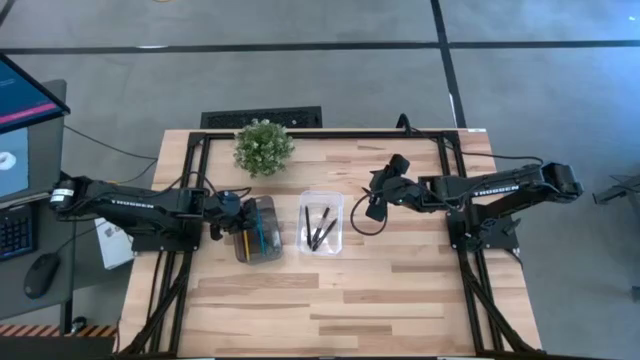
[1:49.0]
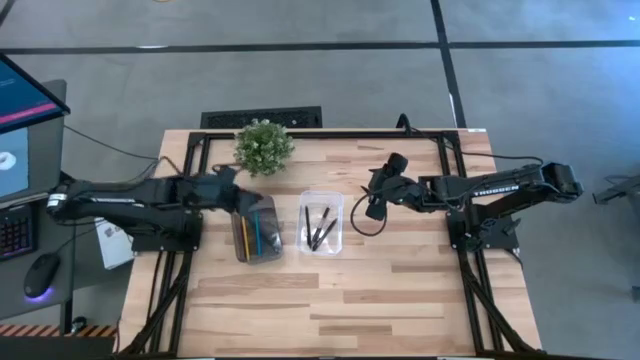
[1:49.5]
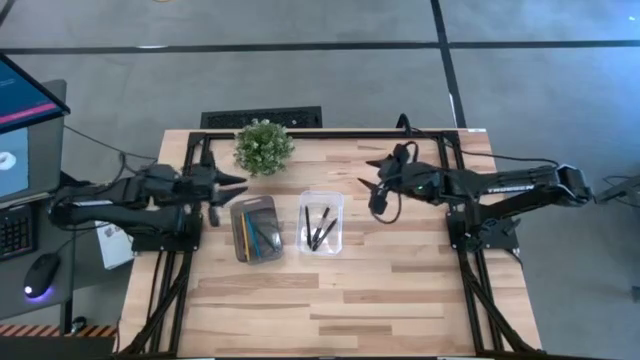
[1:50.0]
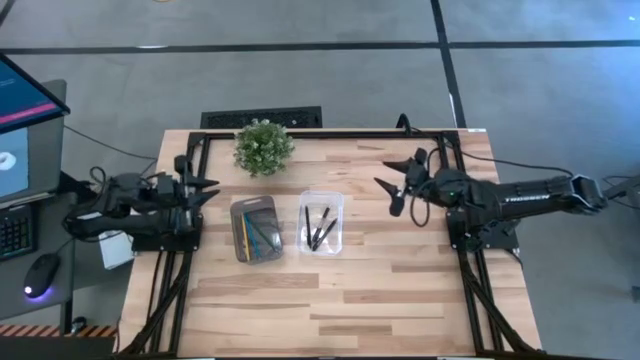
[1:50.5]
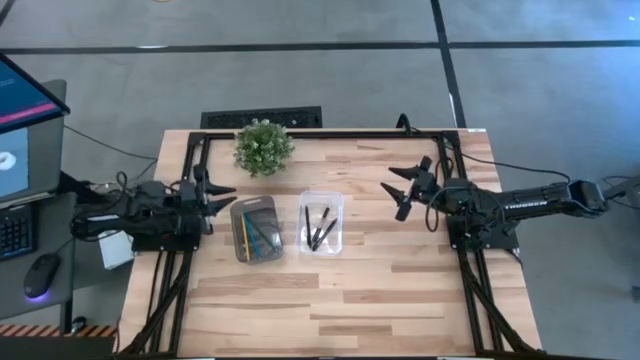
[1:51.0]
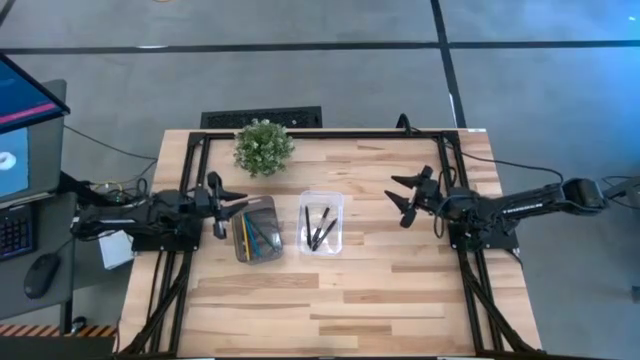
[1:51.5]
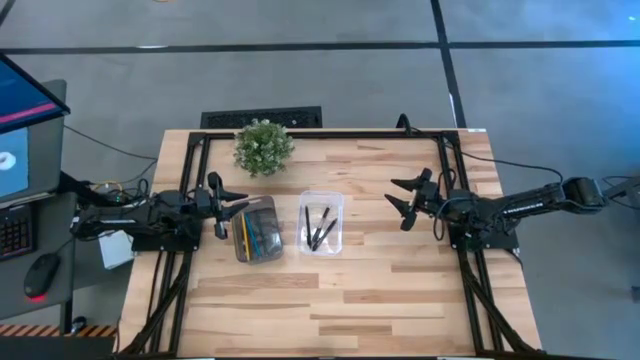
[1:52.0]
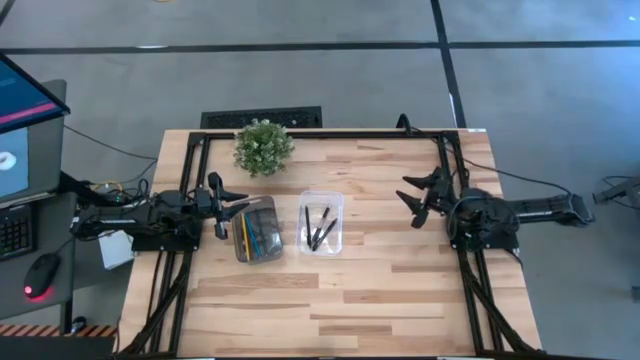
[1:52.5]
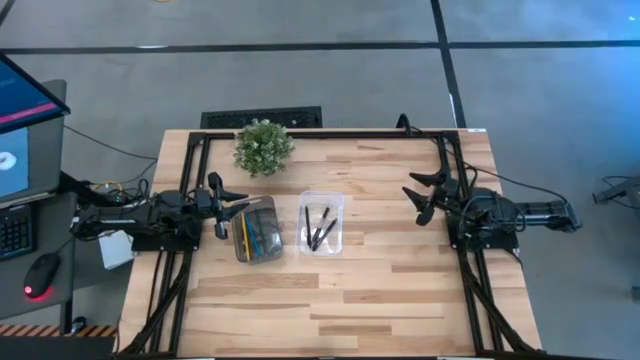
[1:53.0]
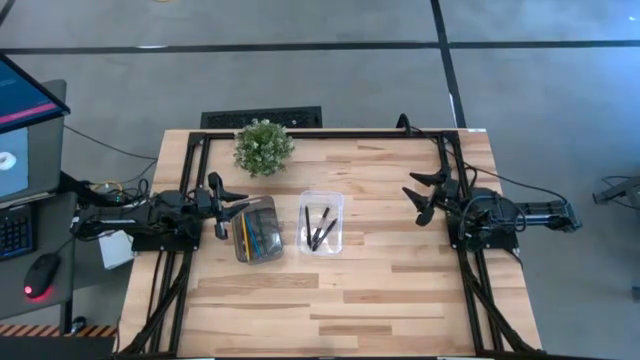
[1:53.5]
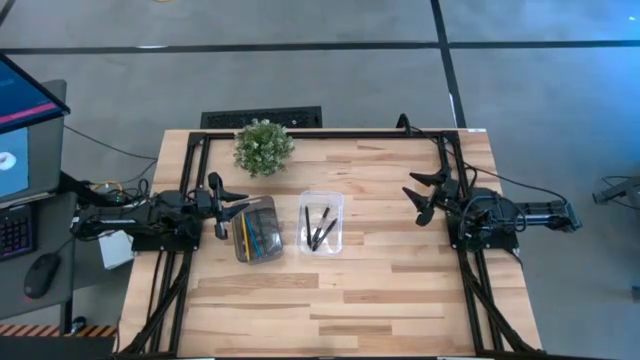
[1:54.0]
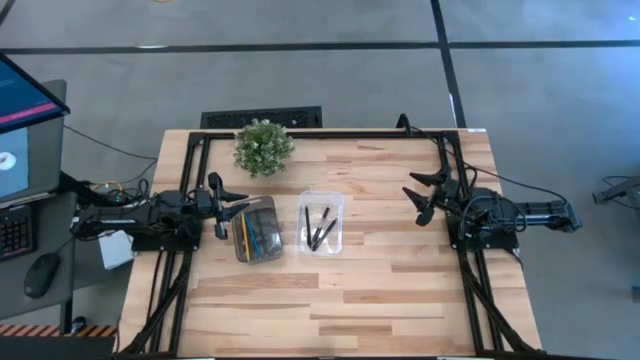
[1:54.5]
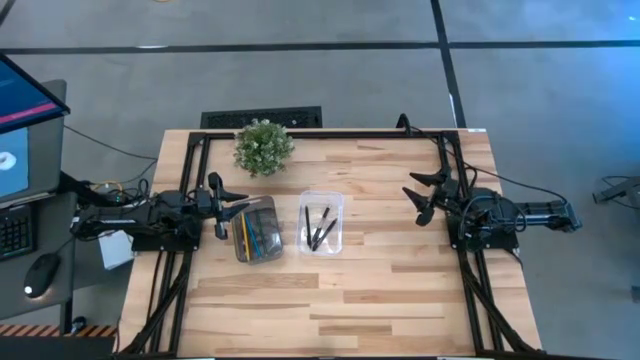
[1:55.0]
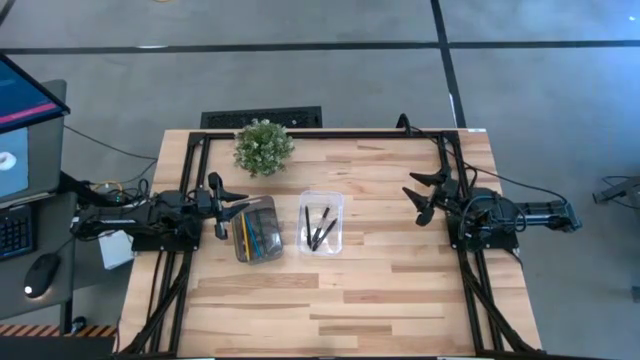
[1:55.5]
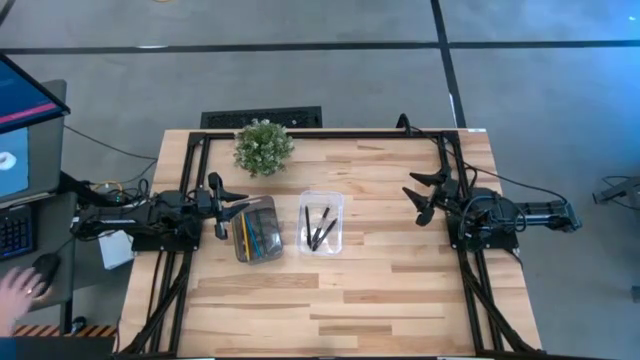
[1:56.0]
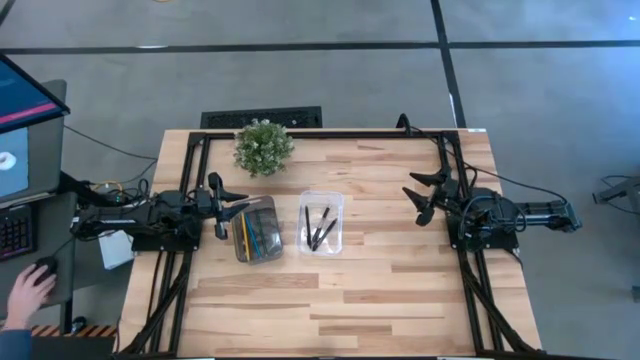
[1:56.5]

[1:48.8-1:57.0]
Task: Sort pens & pencils
Return to Home Position

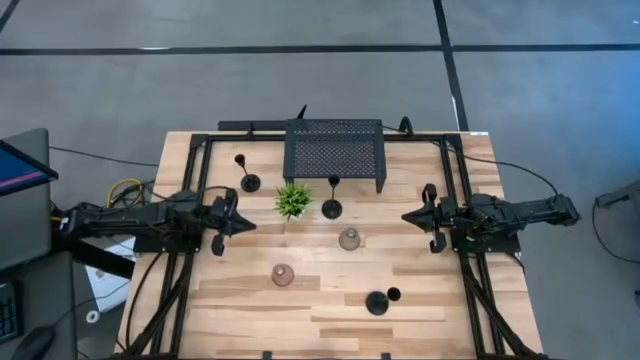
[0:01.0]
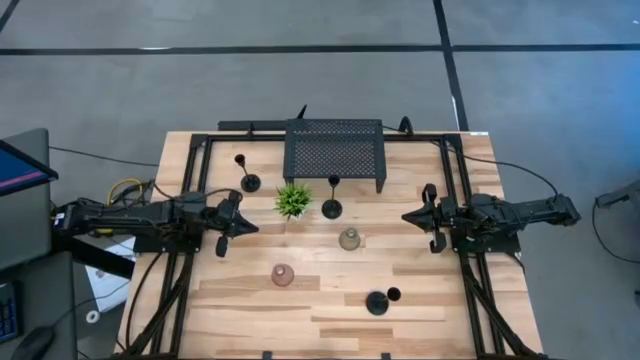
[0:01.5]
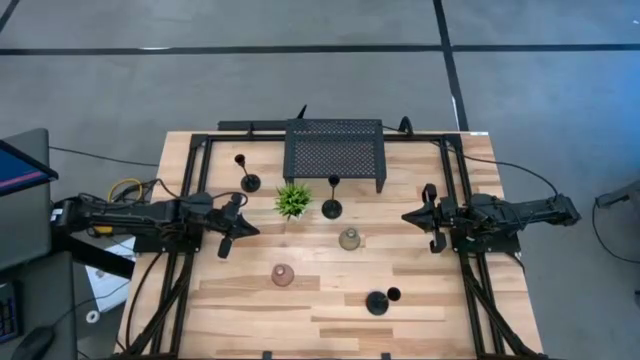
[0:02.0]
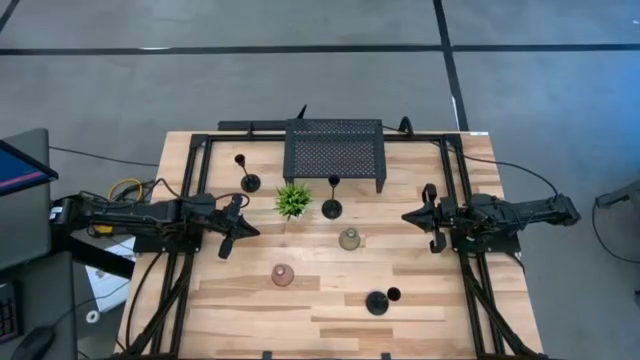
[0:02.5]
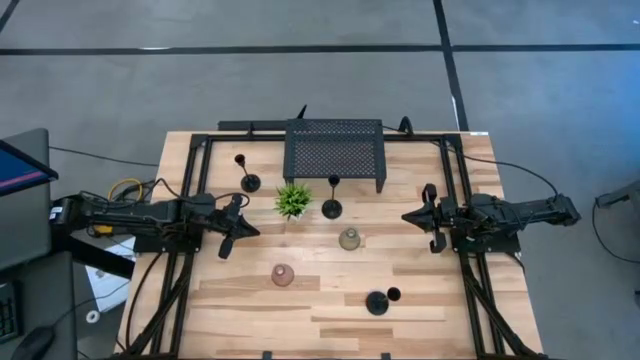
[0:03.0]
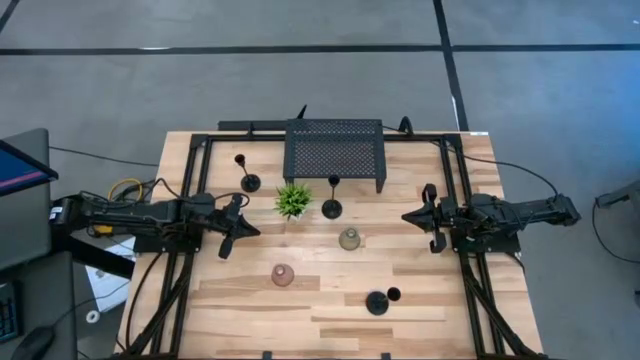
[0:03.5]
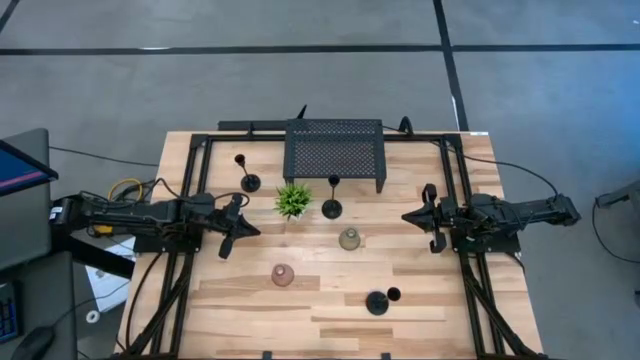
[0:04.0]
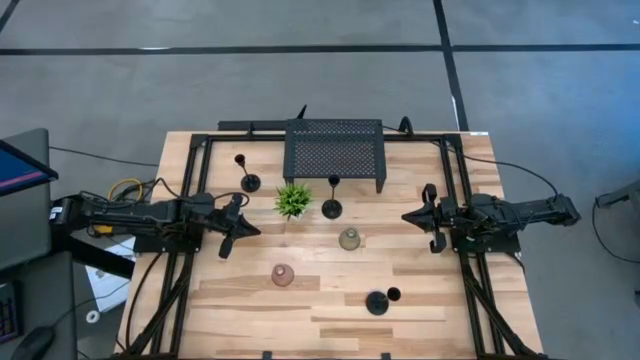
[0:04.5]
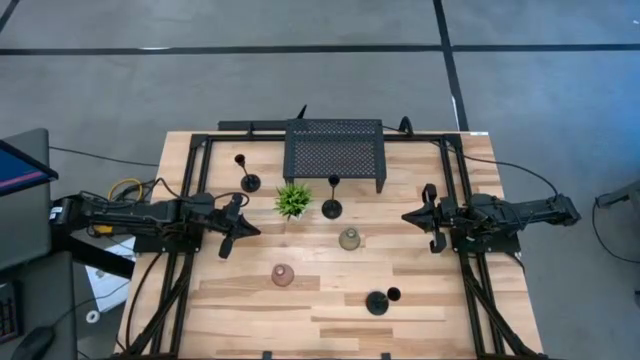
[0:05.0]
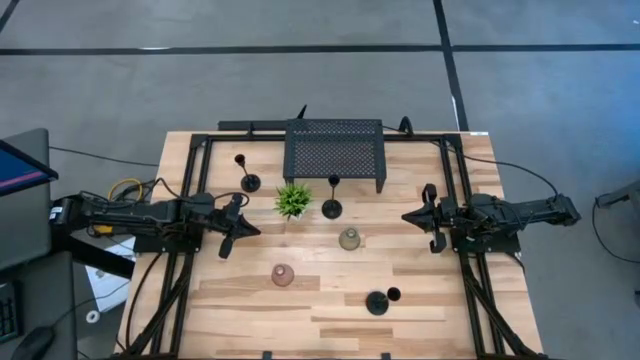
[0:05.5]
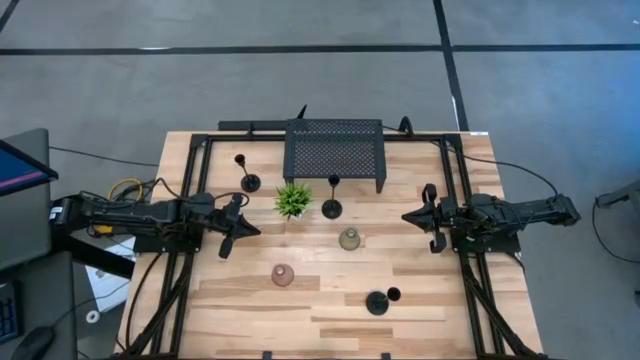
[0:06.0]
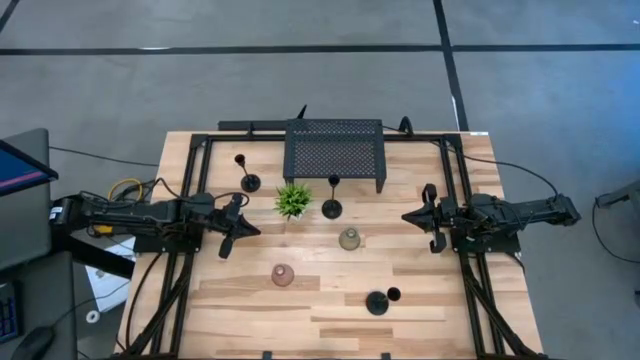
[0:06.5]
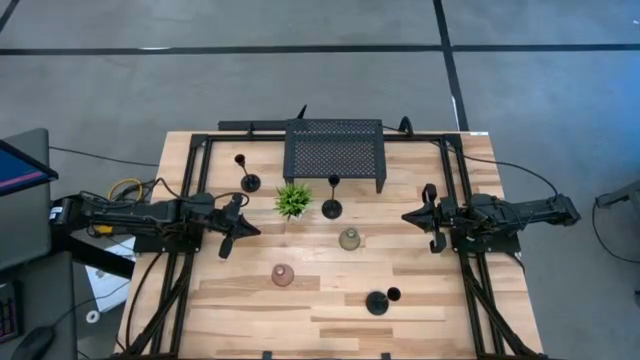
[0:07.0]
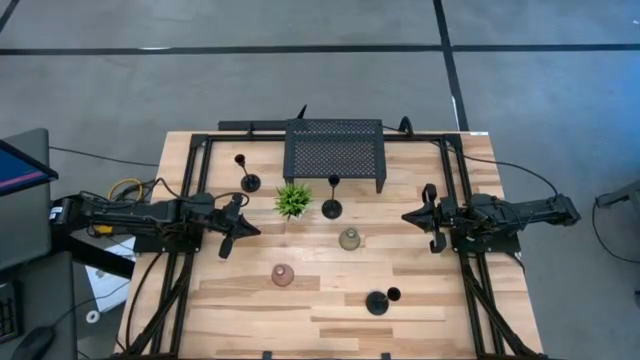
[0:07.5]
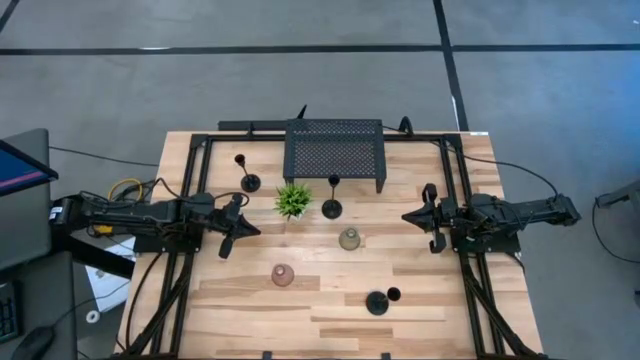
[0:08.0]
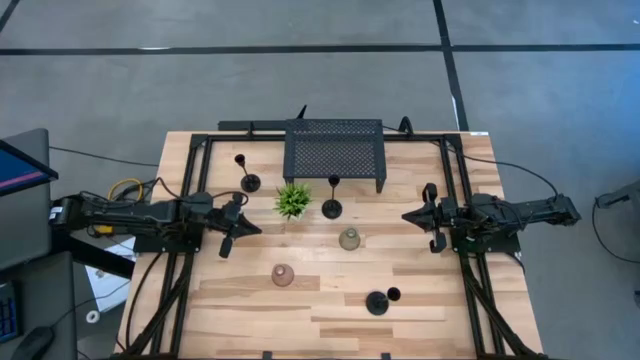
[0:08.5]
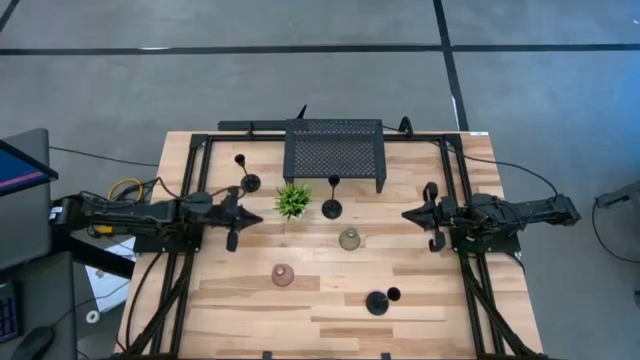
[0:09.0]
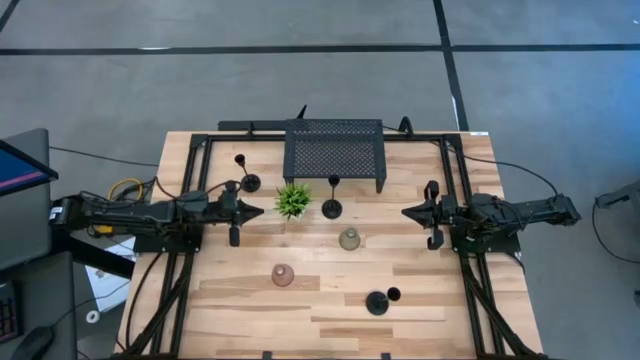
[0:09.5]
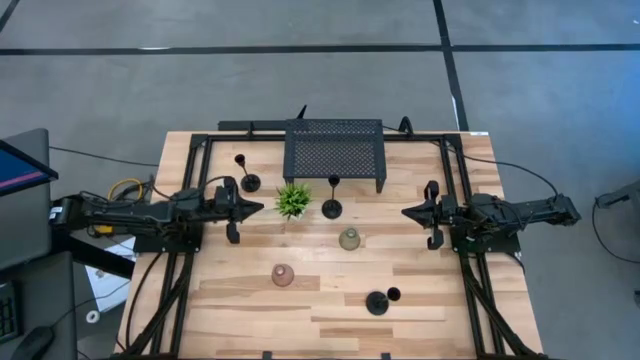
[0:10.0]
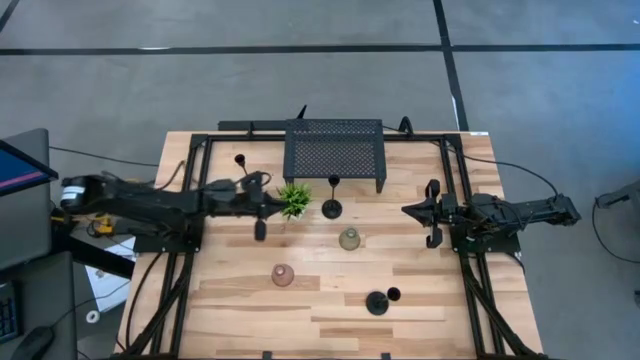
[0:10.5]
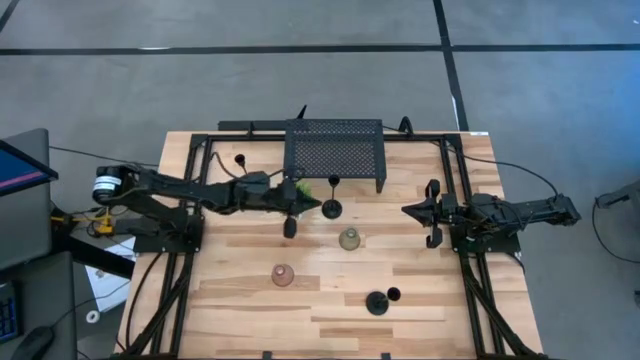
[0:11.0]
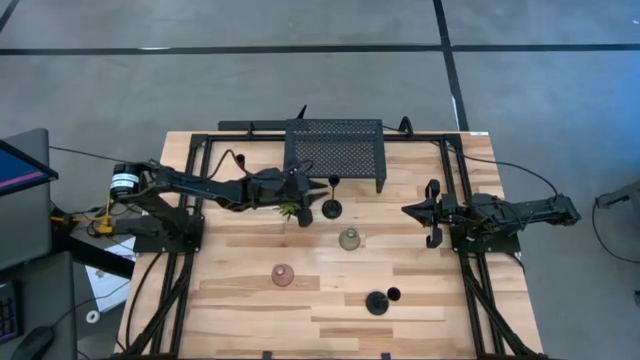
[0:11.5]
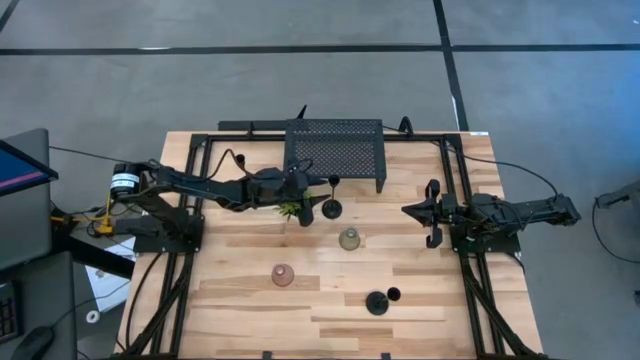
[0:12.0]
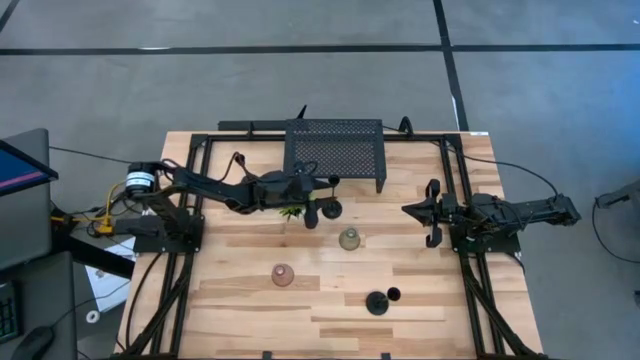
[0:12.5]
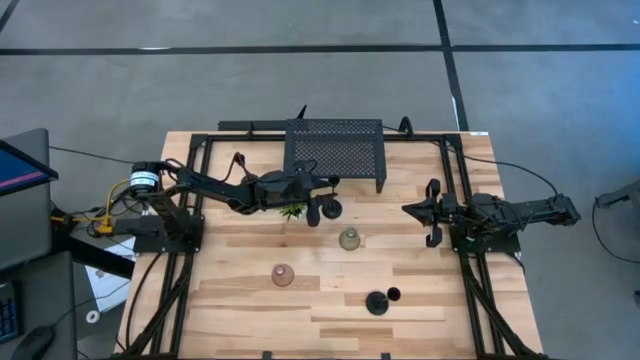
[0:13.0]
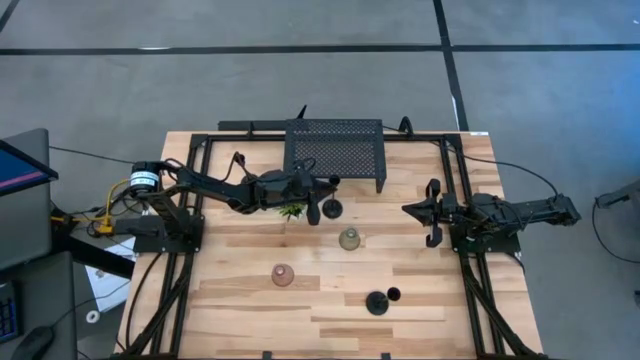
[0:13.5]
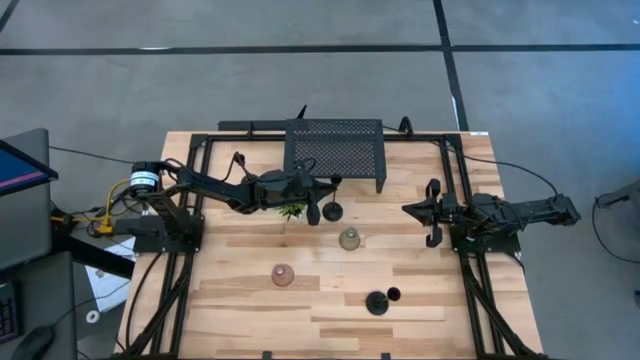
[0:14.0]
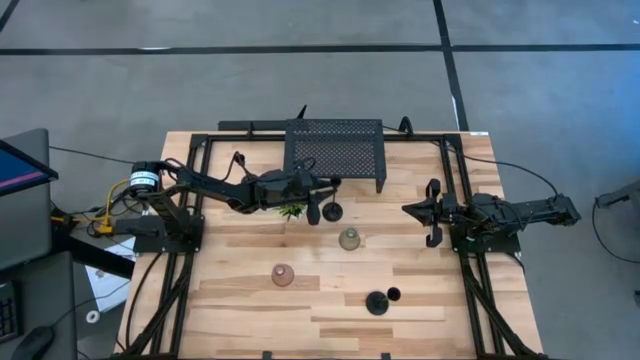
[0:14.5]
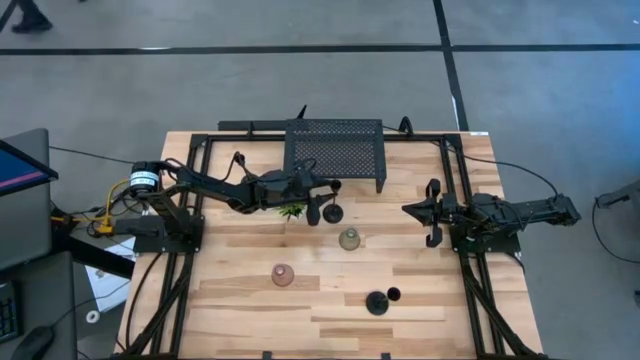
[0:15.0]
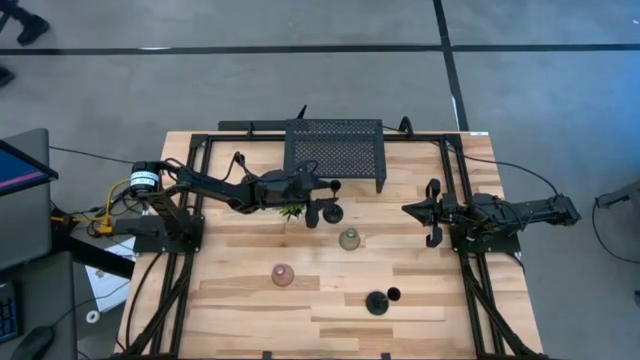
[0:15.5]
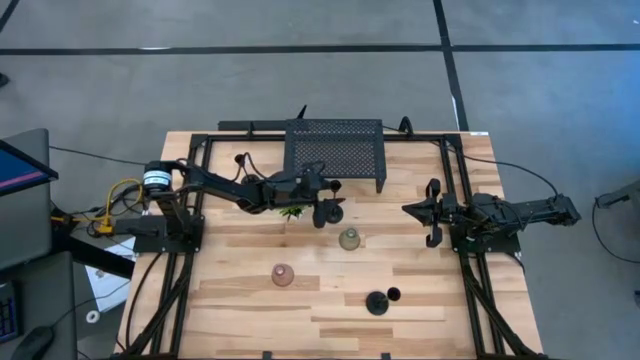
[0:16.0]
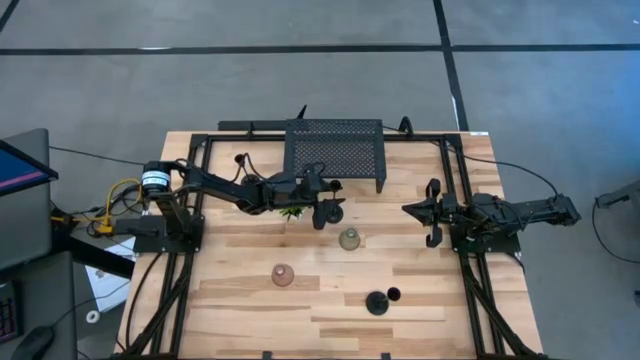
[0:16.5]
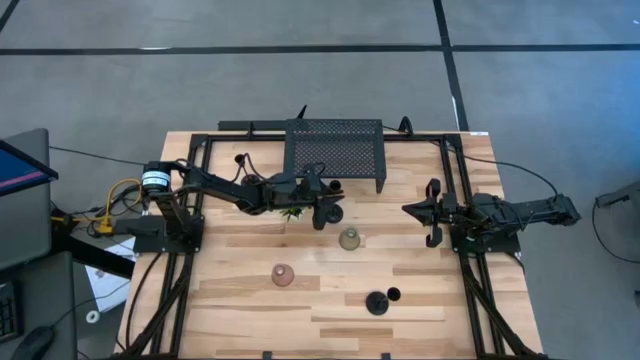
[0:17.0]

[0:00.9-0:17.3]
Task: Pick & Place candle stick holders
Put the middle black candle holder on the shelf
